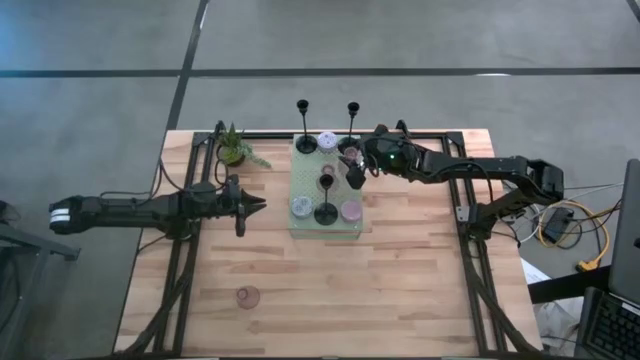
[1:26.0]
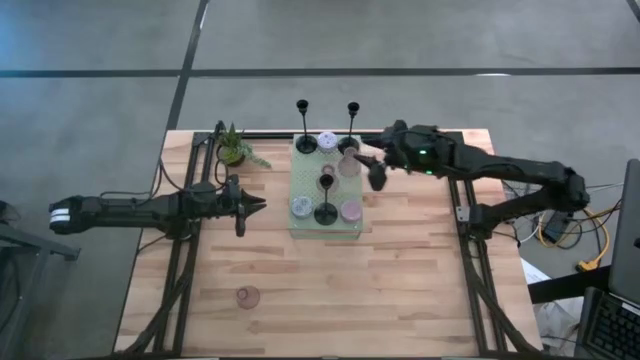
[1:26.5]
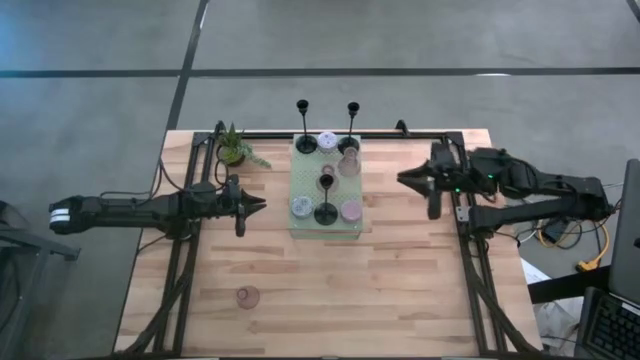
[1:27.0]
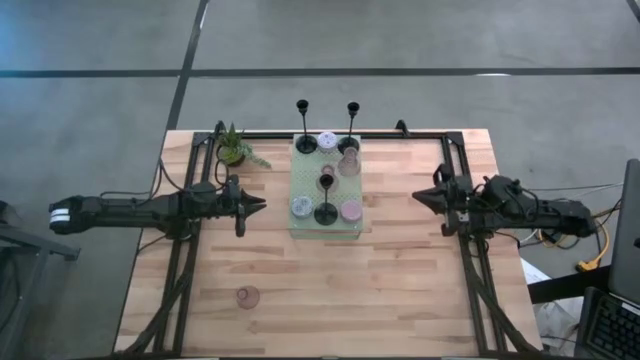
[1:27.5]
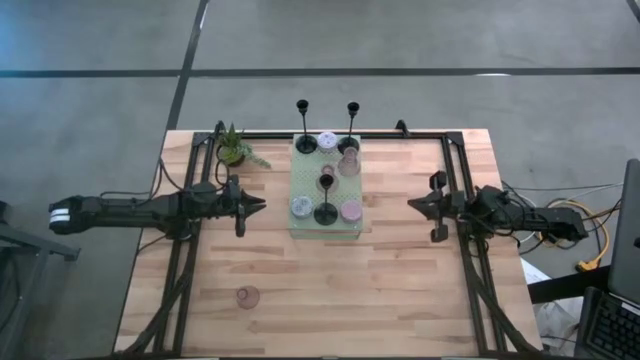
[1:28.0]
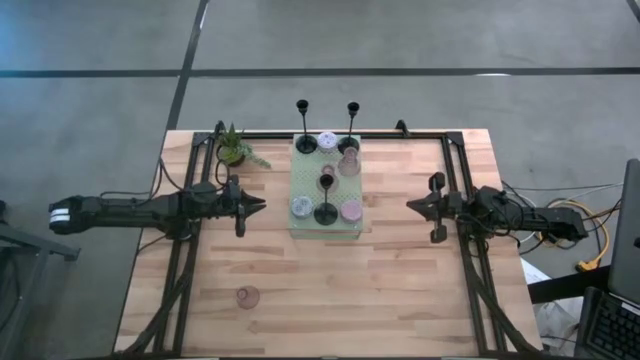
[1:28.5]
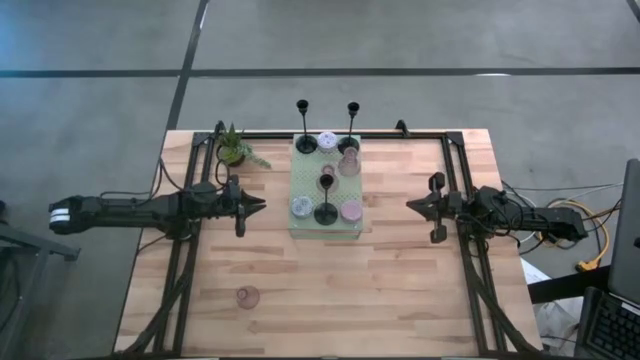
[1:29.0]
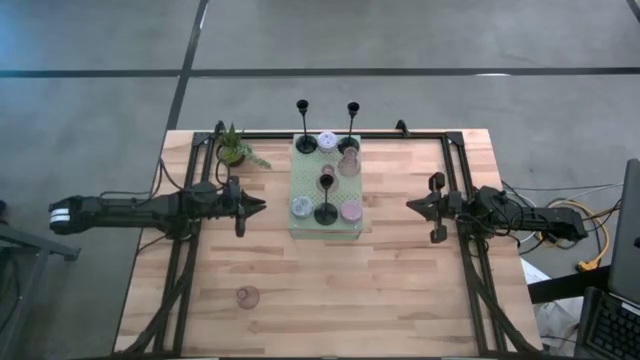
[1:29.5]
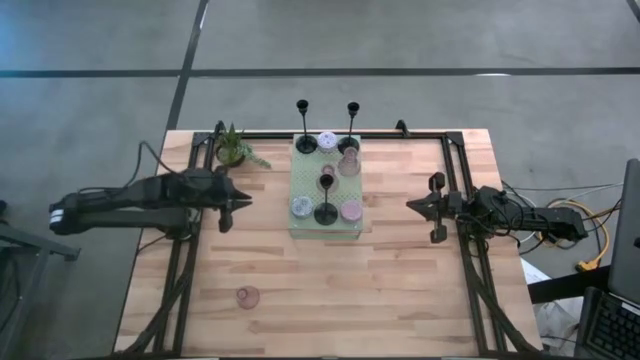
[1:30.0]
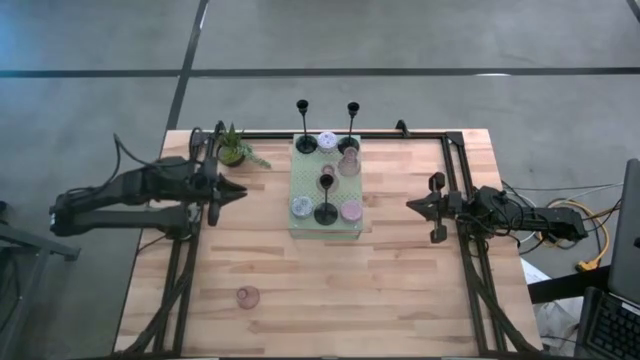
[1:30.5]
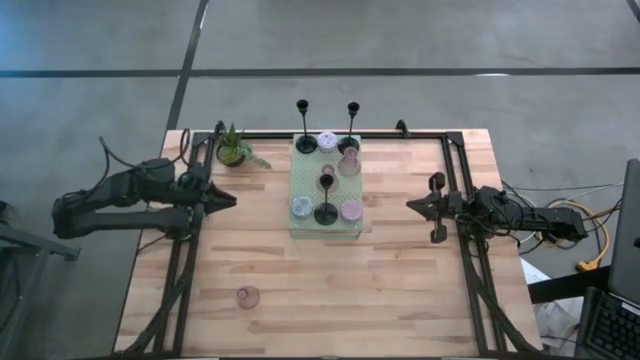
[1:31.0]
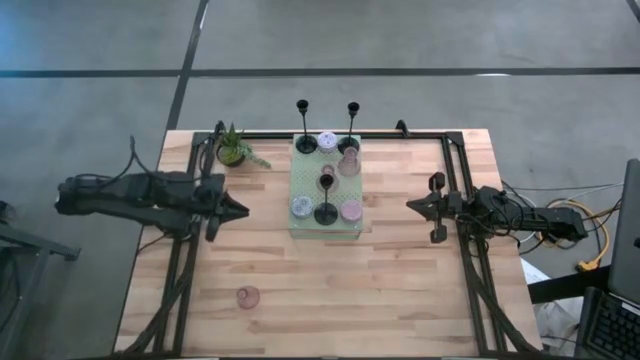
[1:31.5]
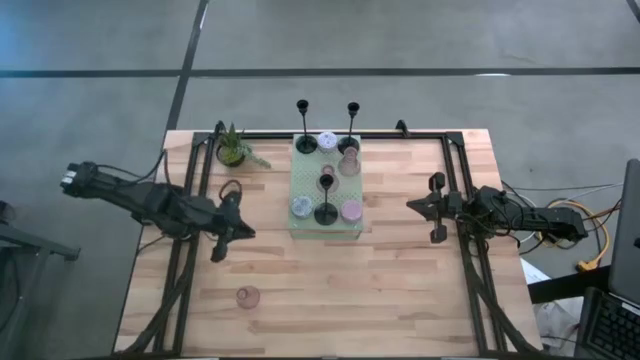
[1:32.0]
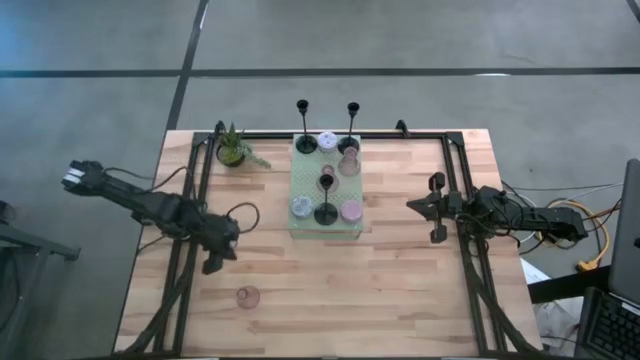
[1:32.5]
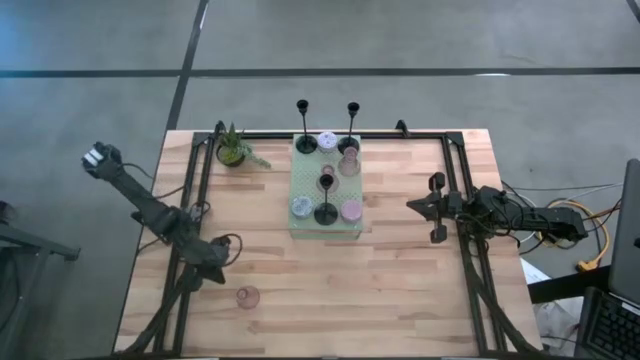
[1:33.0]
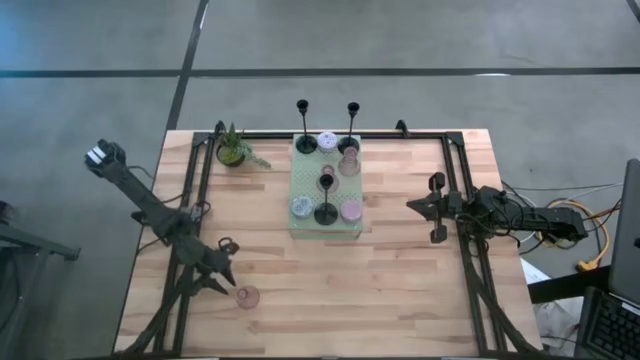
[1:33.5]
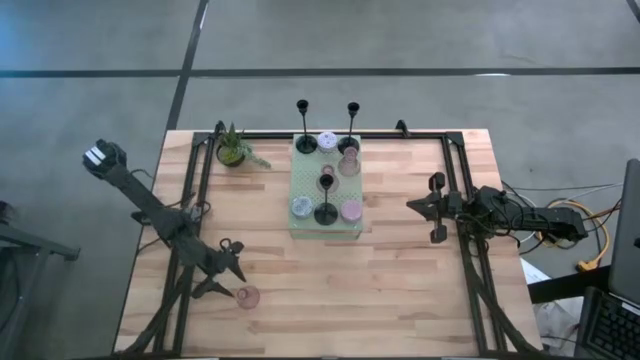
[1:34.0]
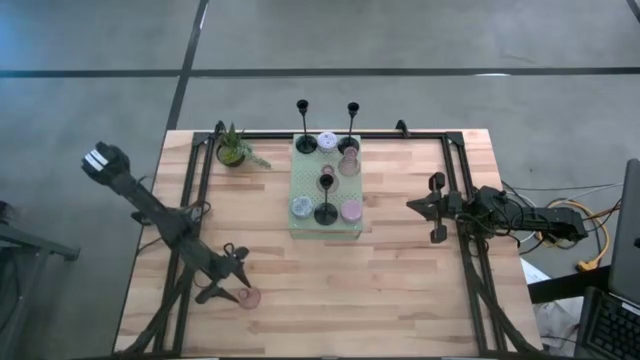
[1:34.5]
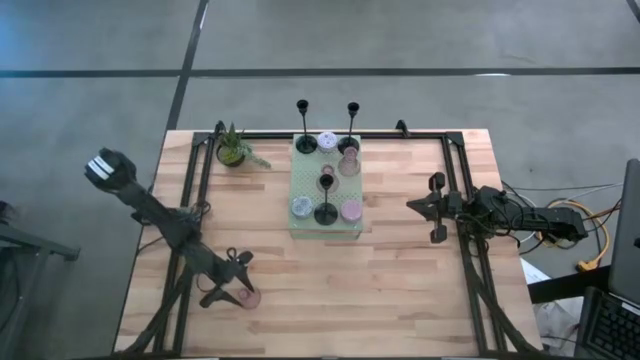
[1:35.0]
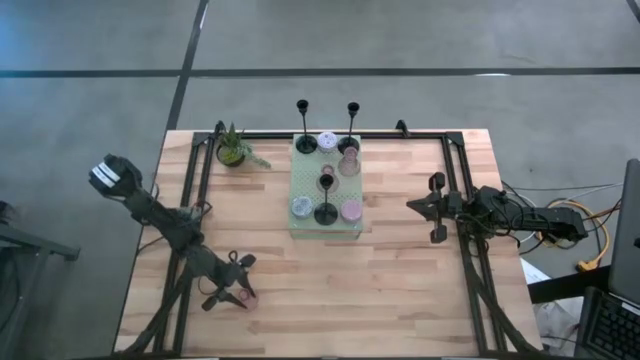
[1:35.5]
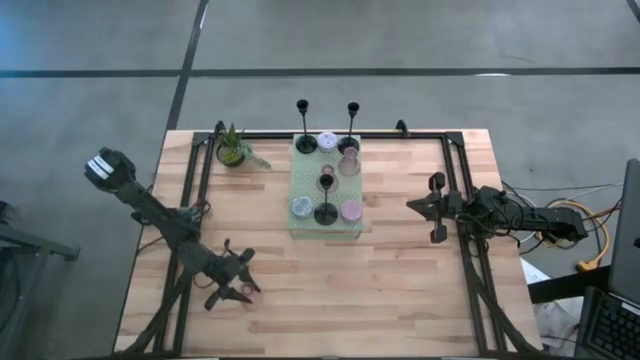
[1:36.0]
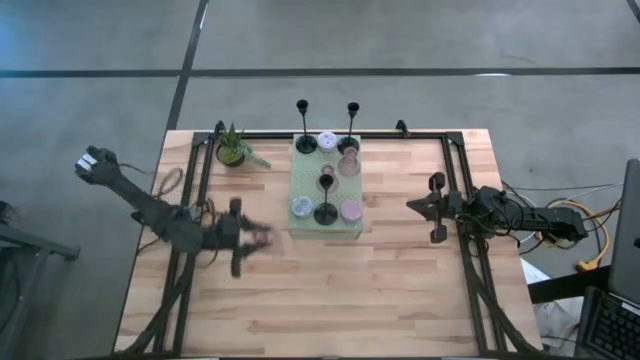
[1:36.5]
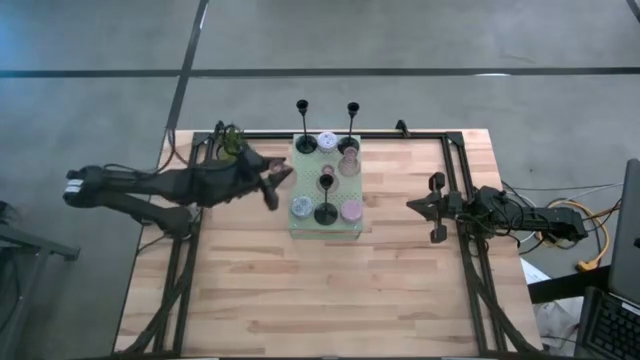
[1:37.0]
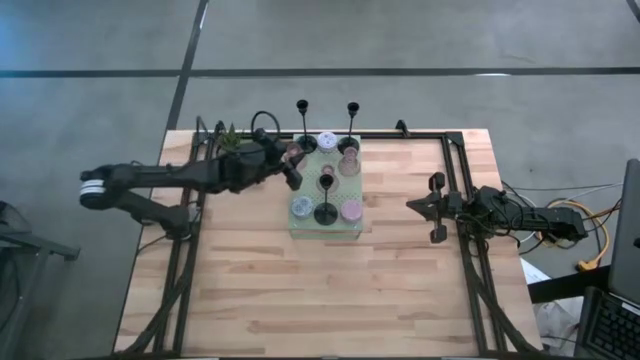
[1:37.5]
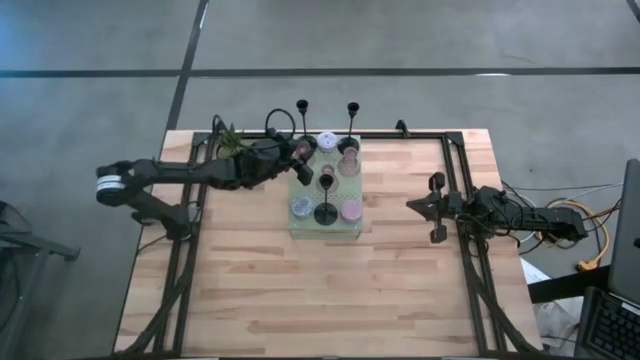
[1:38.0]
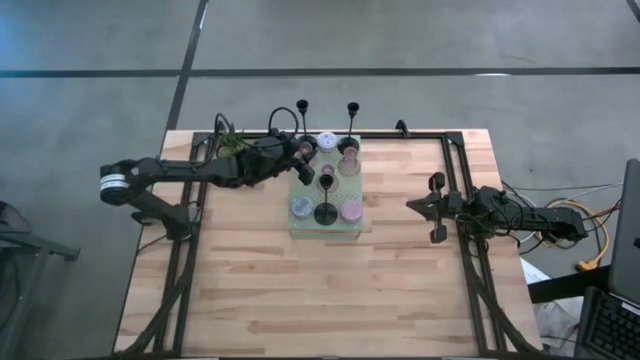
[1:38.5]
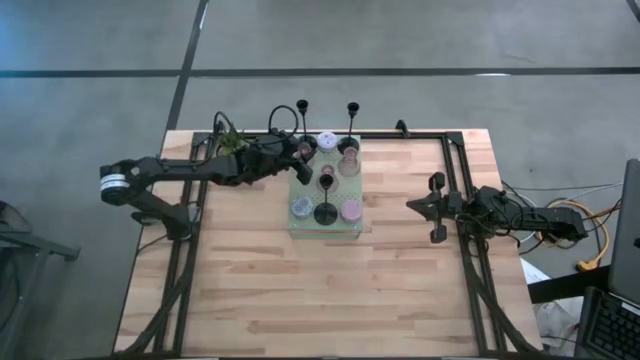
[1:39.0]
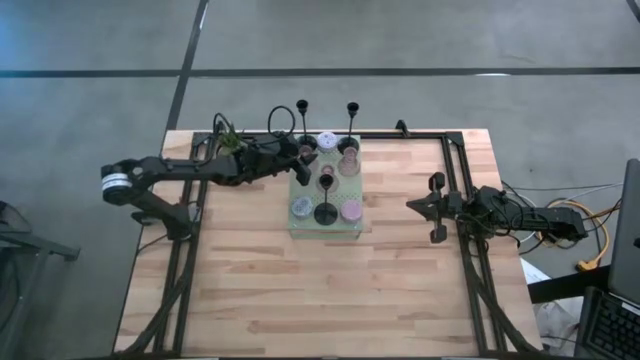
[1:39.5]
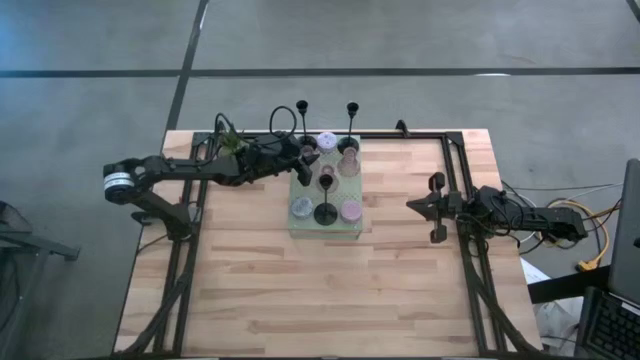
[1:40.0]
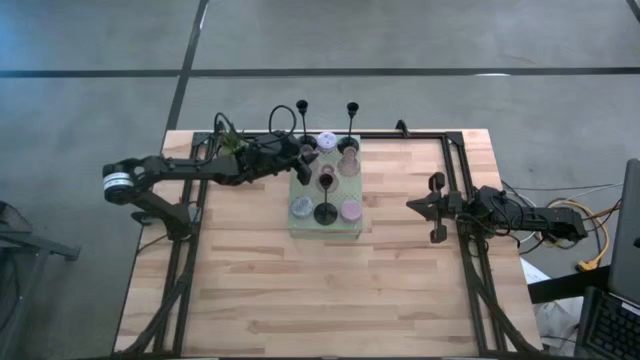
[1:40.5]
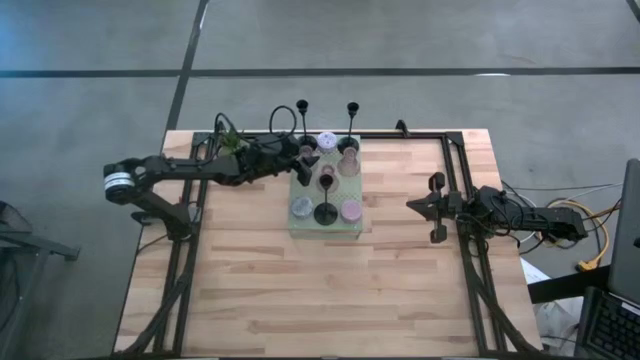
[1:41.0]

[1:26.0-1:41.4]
Task: Pick & Place candle stick holders
Put the glass candle holder on the shelf

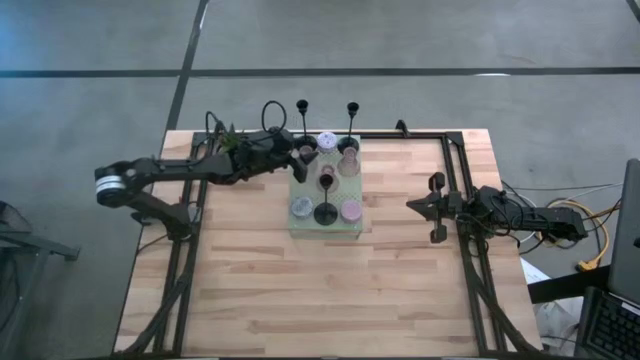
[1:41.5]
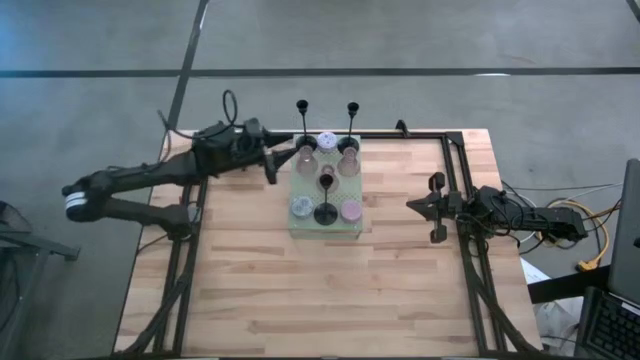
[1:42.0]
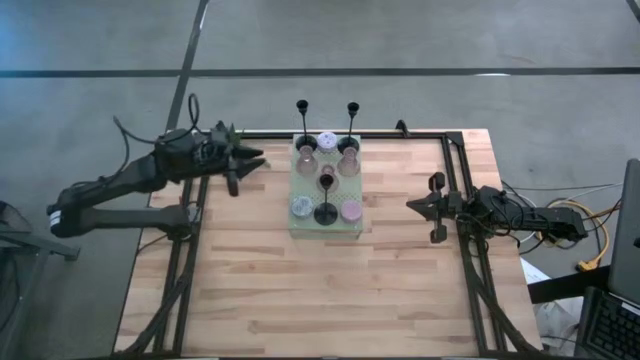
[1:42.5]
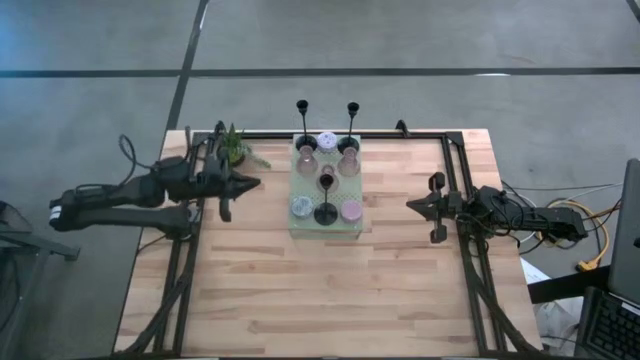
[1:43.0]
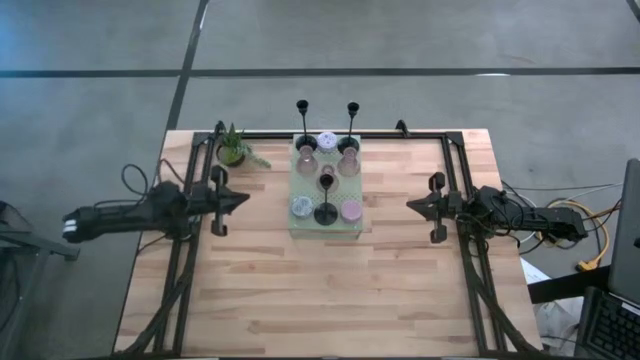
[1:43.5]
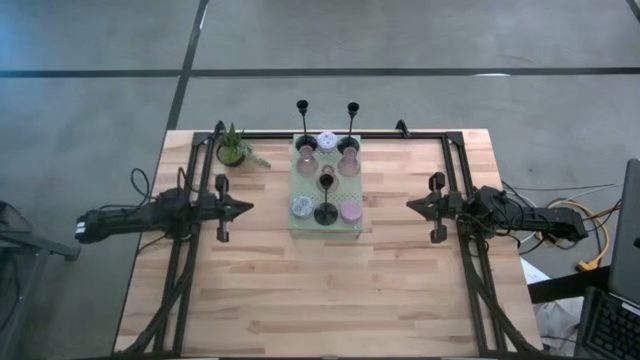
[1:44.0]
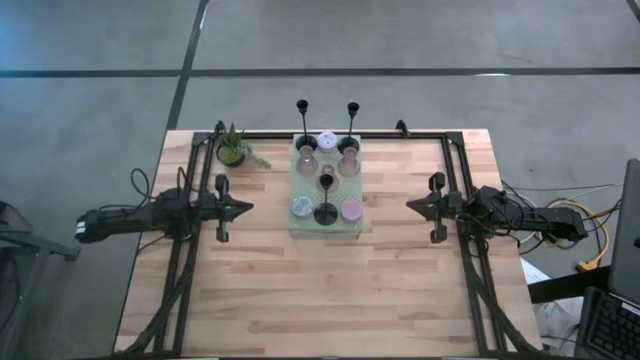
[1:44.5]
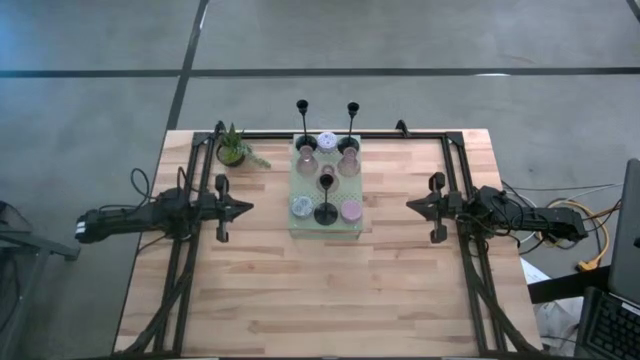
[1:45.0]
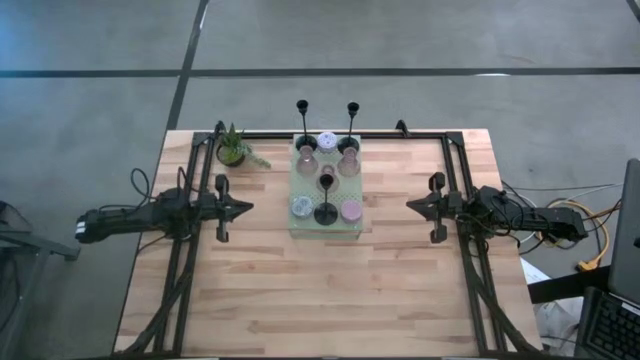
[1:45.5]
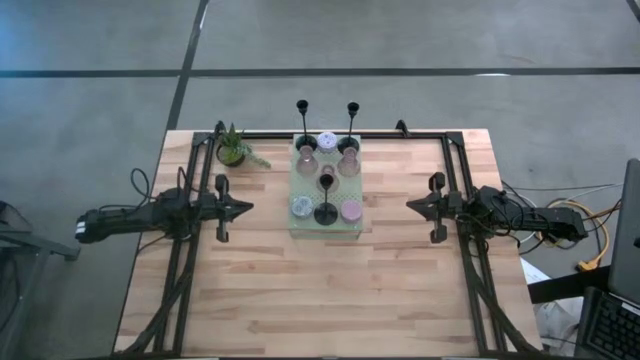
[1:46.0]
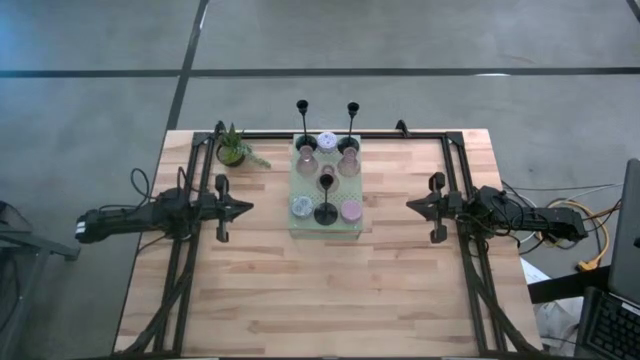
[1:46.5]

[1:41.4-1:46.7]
Return to Home Position
